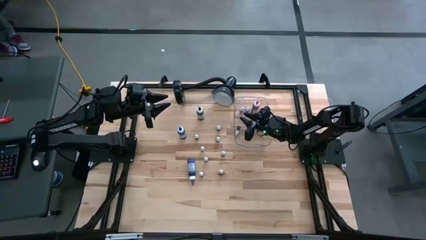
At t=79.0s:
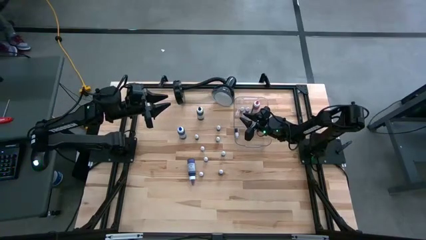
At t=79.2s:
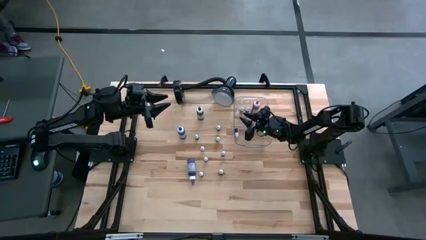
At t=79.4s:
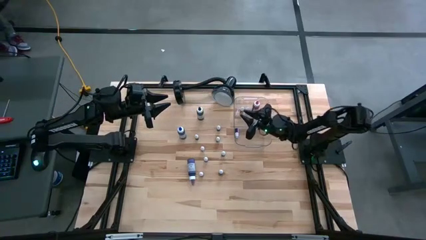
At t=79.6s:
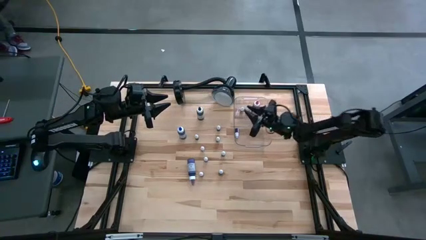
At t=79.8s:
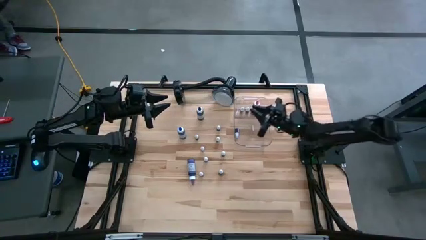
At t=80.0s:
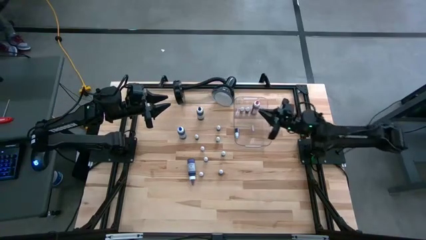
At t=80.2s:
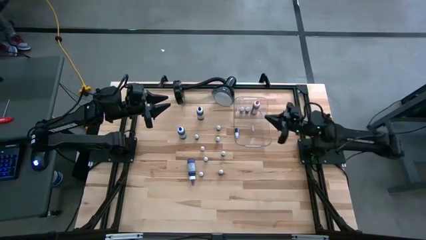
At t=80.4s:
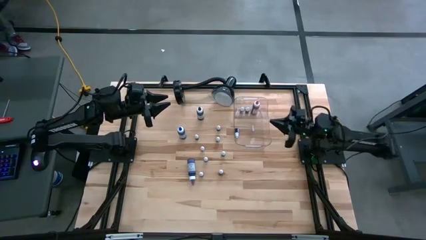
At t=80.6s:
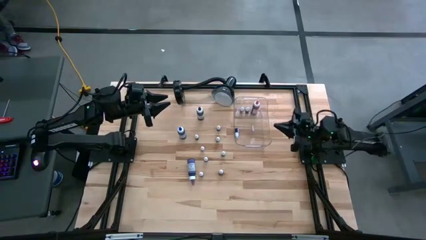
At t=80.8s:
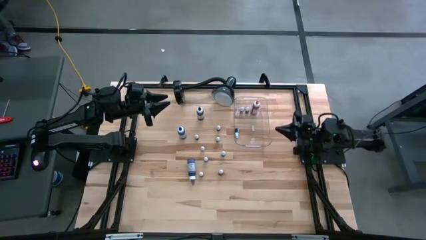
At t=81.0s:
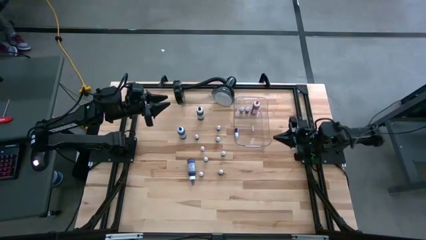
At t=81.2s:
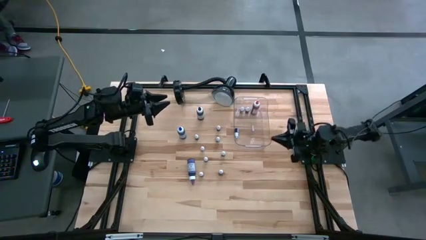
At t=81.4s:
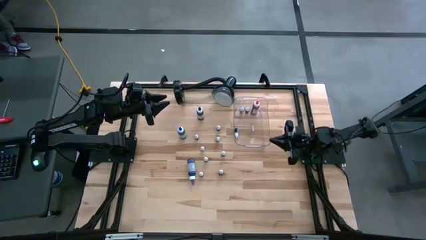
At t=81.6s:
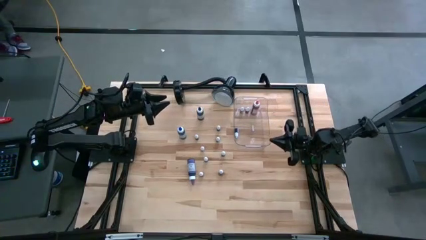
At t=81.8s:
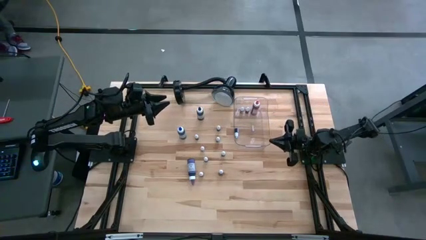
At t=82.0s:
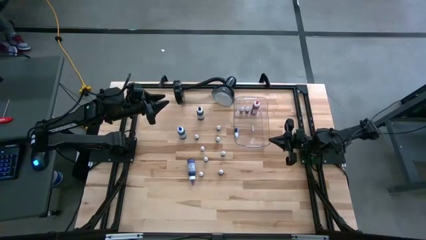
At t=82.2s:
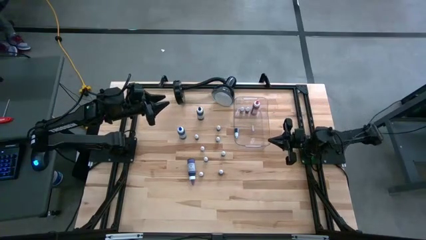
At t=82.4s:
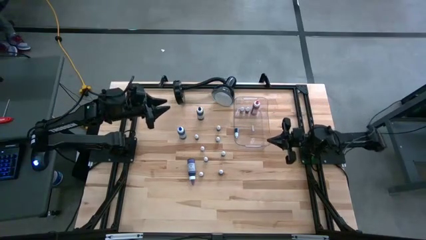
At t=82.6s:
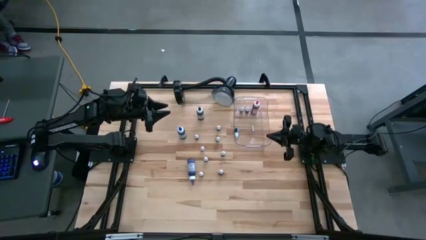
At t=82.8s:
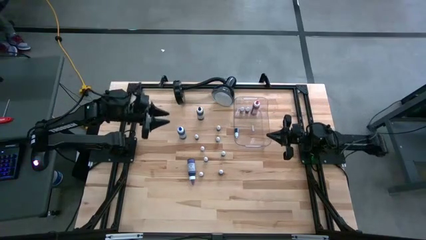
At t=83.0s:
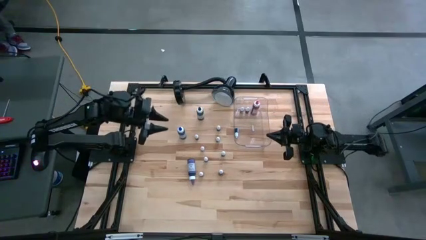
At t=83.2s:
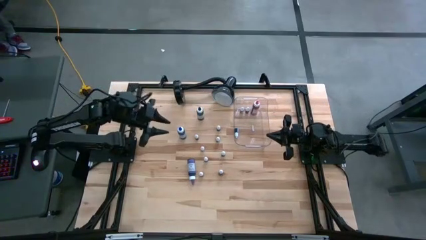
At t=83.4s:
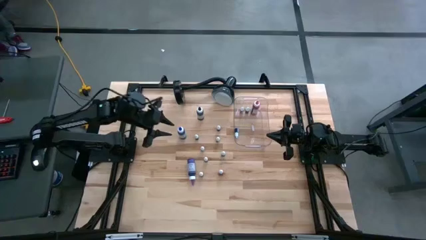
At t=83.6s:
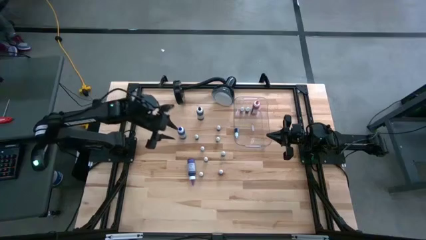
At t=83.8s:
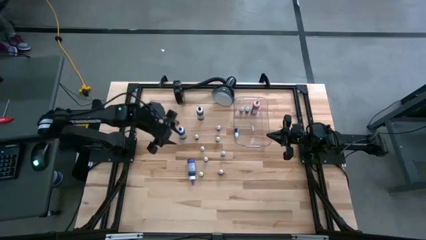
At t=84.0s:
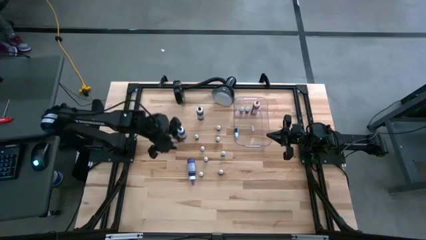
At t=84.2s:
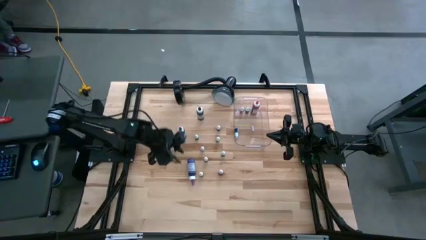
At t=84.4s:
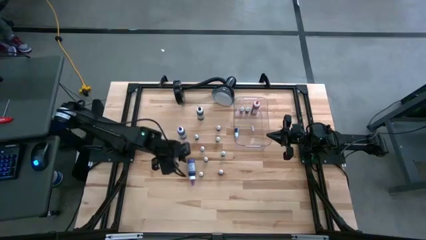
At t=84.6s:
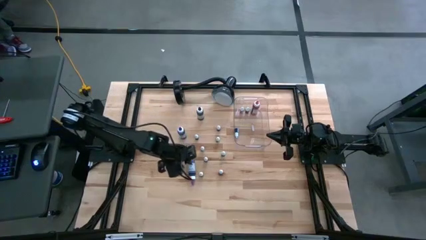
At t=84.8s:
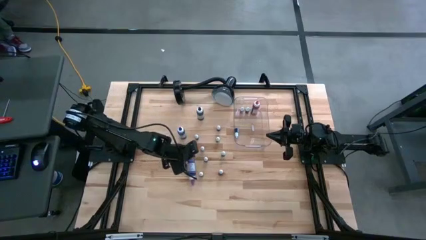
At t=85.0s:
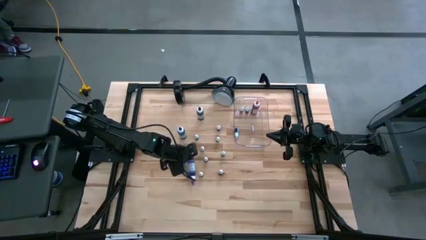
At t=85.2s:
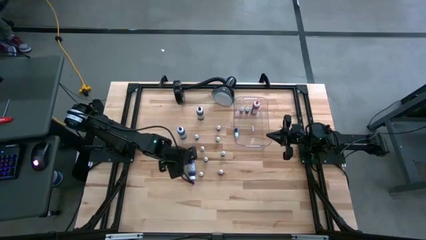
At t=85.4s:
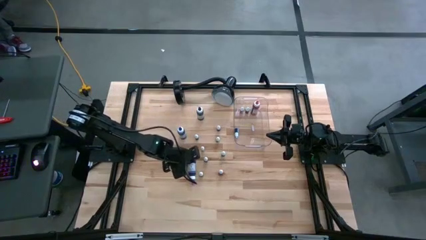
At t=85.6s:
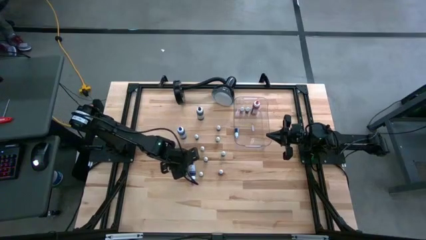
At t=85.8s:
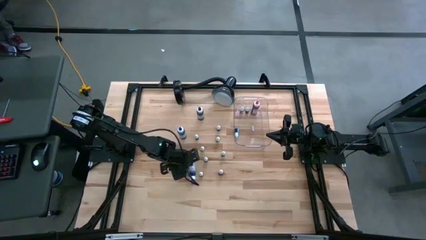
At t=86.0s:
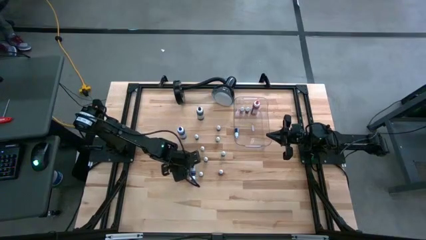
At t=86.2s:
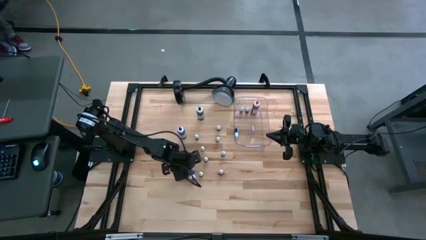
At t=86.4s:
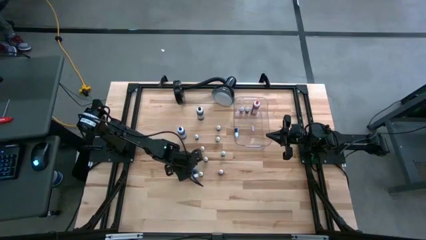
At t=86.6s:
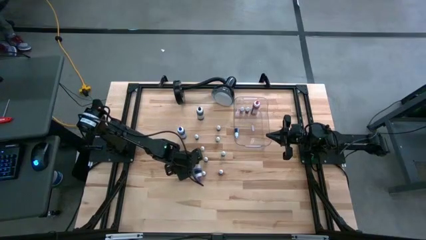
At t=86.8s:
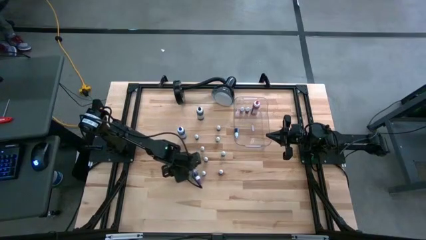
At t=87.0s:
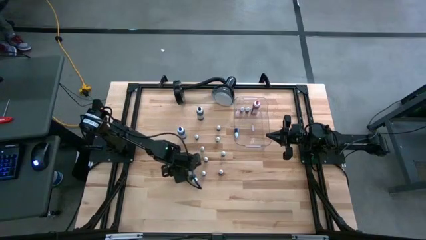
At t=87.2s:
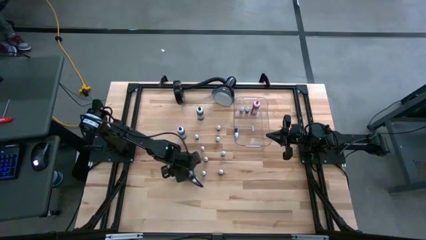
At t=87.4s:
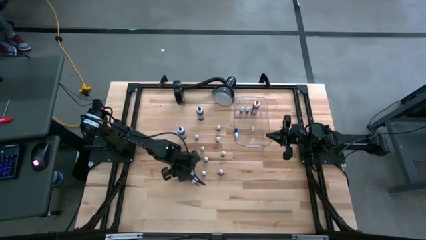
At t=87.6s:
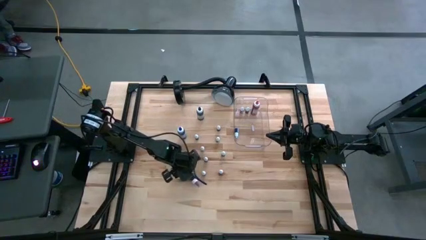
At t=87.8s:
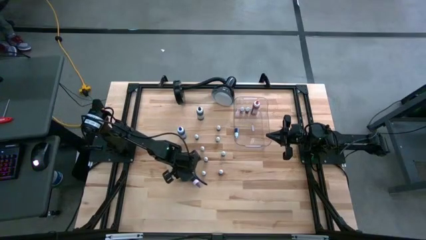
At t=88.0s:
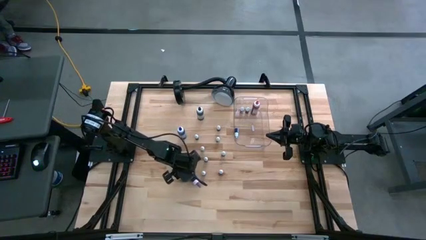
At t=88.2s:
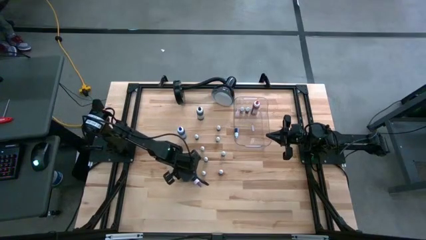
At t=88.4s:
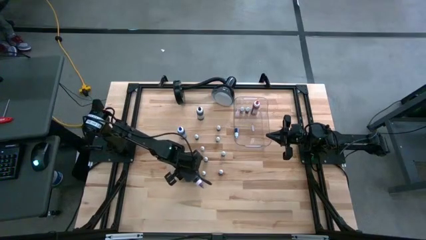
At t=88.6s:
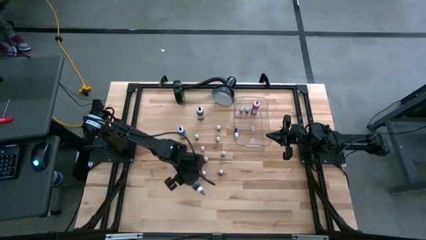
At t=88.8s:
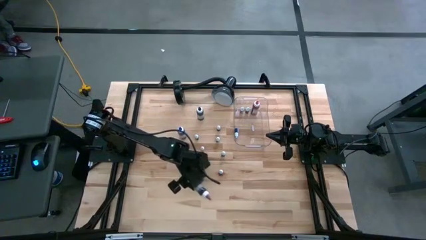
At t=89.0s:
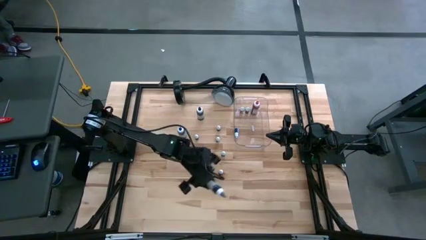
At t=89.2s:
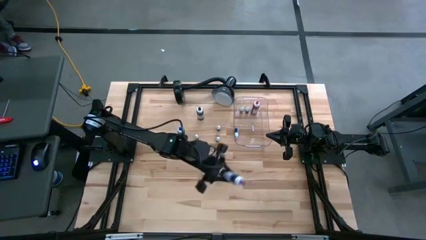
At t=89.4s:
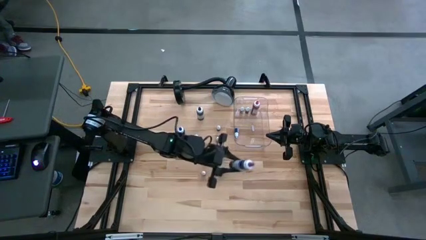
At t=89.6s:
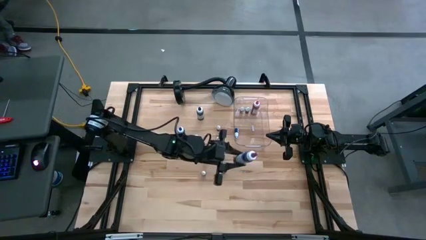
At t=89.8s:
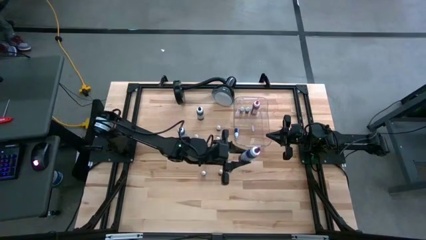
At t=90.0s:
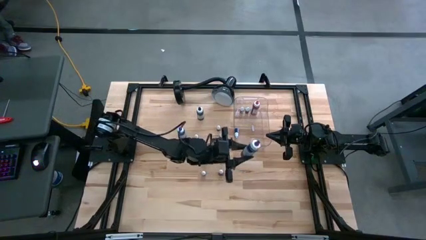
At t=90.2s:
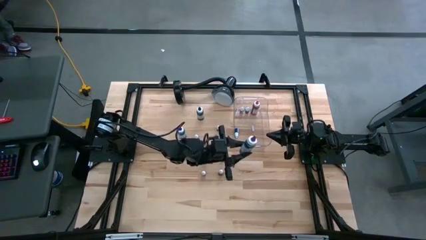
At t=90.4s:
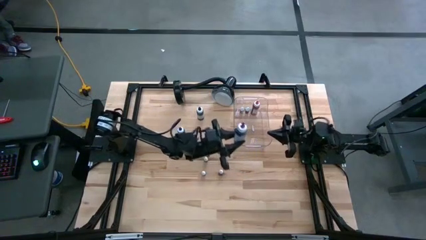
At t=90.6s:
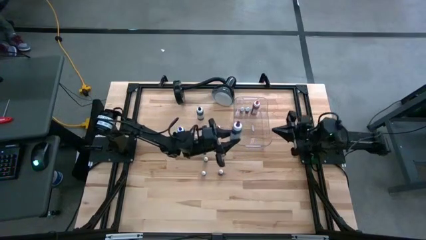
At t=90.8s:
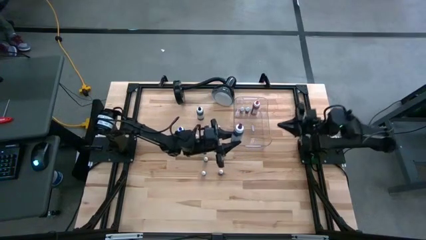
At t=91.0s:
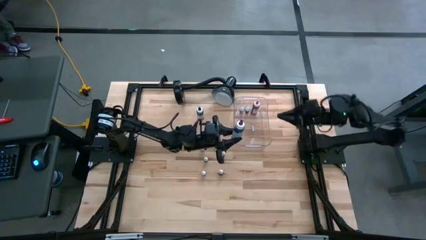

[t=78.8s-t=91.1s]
Task: Pick & Place food coloring
Put the big purple food coloring bottle into the transparent bin

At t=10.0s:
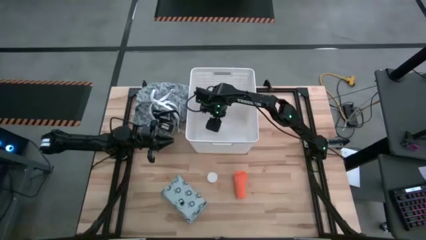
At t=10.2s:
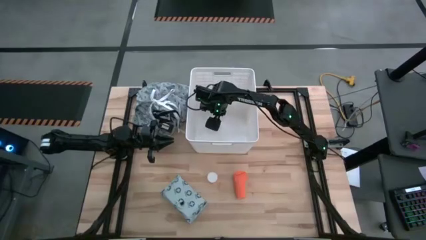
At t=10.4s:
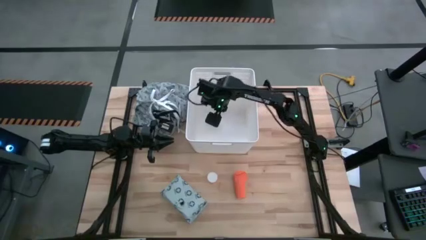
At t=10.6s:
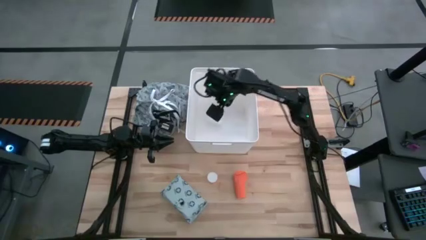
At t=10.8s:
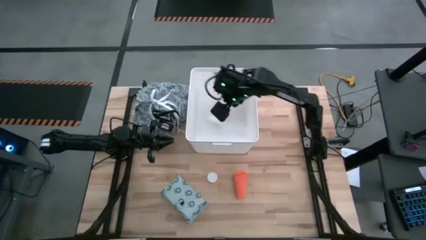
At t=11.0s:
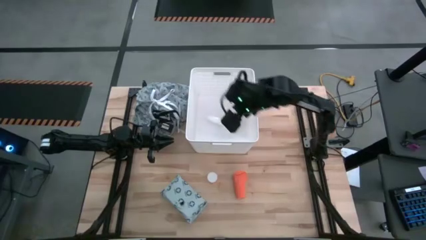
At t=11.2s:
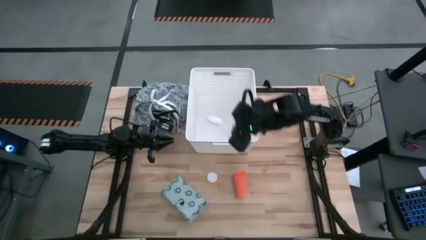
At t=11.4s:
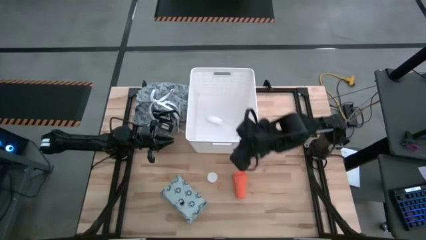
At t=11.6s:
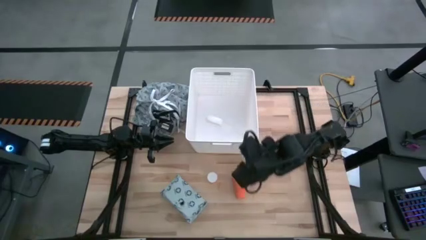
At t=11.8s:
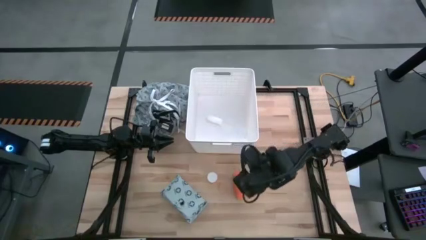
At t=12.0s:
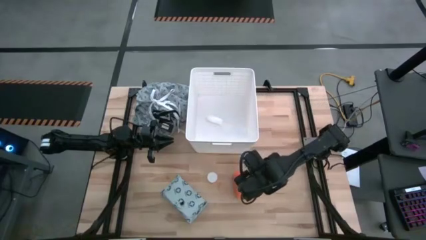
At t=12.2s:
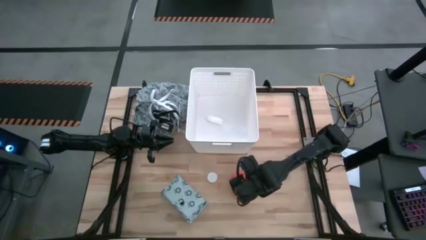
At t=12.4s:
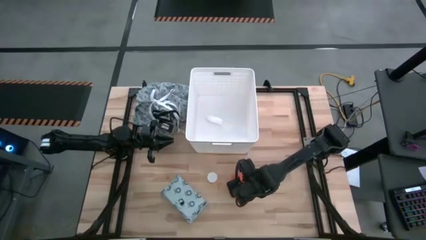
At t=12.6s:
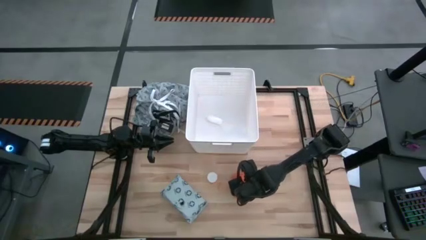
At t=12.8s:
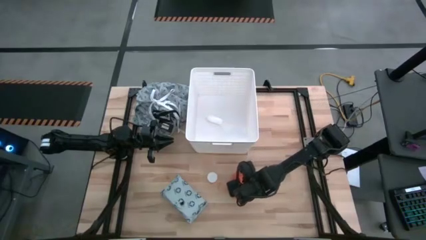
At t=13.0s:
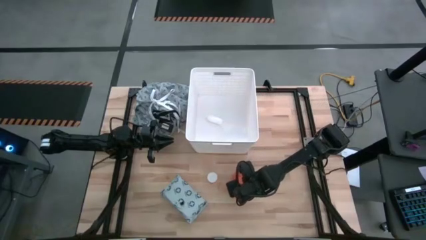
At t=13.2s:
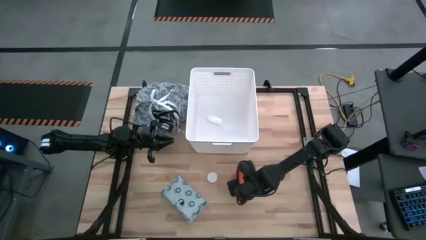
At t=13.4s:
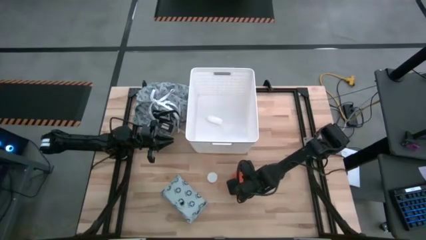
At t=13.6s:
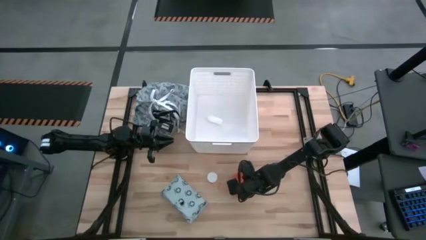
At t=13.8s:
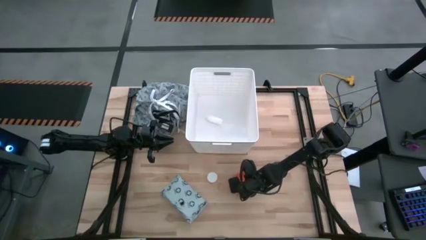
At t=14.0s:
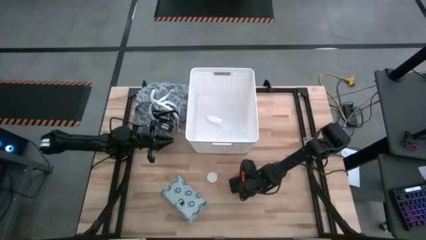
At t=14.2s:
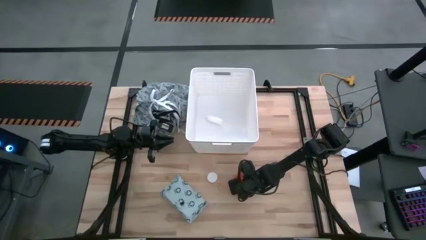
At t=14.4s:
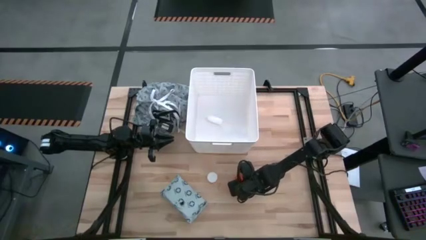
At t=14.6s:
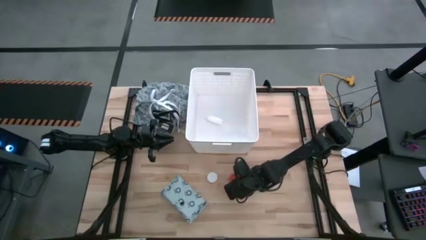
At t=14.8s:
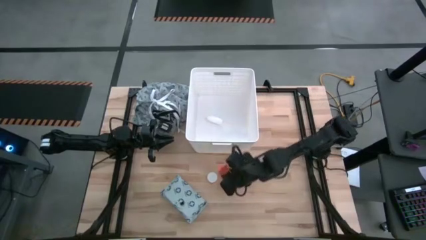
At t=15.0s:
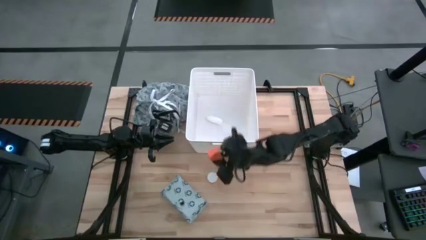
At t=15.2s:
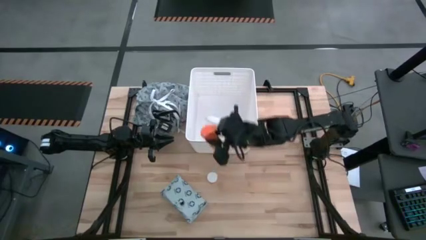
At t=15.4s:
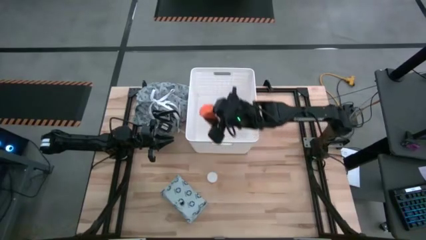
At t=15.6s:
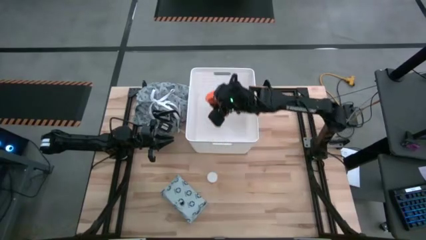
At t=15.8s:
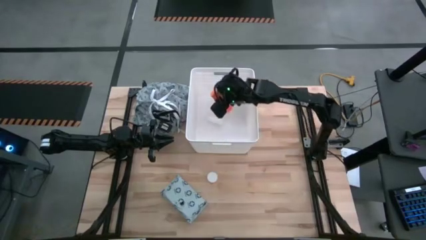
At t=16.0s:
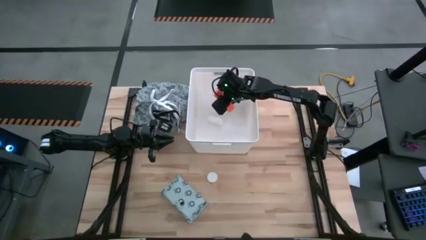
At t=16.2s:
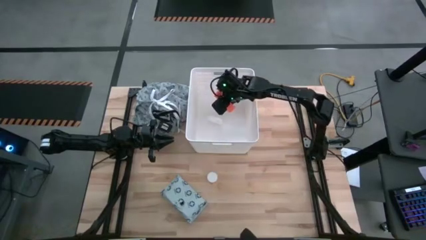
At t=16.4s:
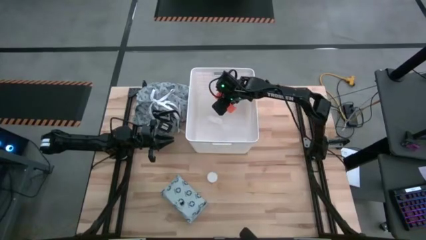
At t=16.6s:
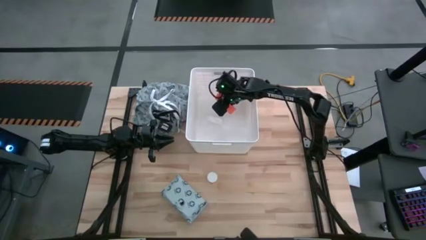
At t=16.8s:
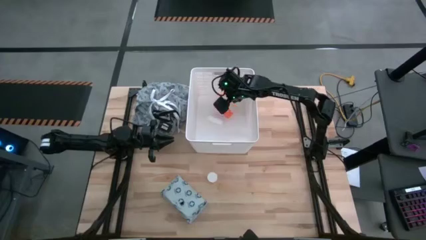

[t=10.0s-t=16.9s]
Task: Pick & place medical supplies in basket/bin
Put the orange bandage into the white bin
